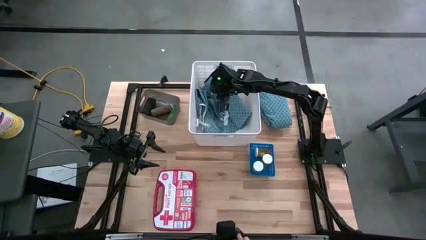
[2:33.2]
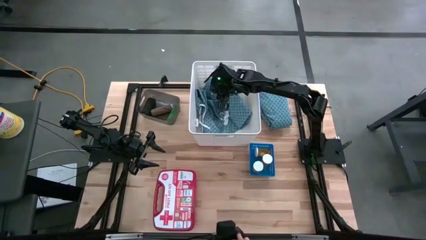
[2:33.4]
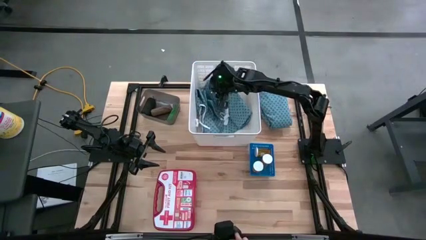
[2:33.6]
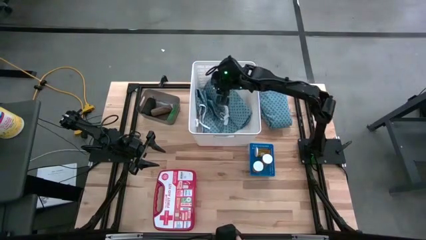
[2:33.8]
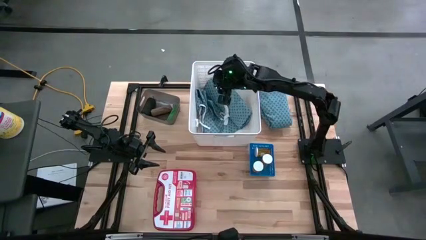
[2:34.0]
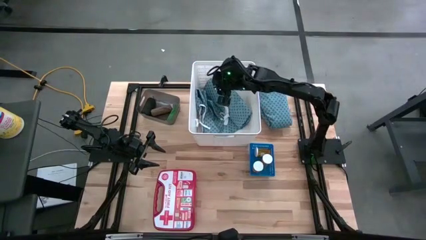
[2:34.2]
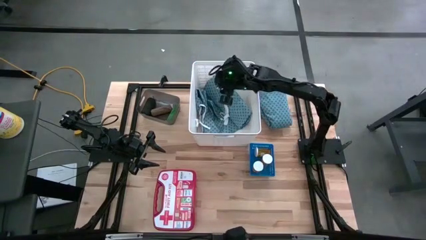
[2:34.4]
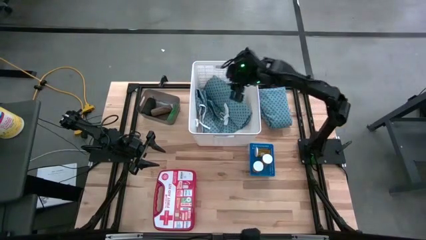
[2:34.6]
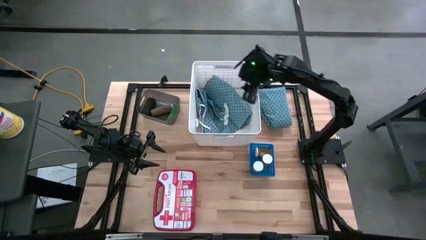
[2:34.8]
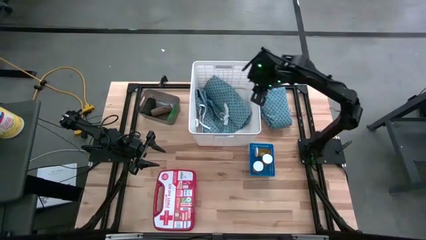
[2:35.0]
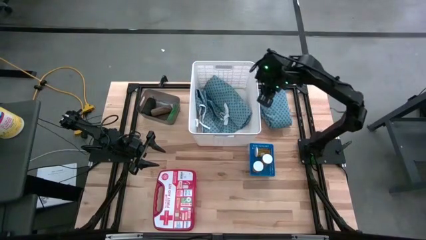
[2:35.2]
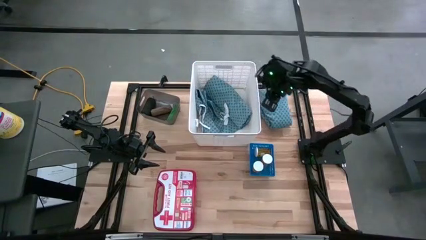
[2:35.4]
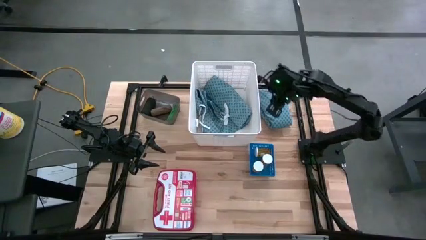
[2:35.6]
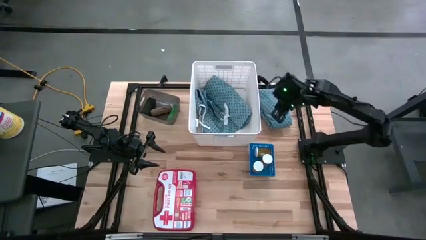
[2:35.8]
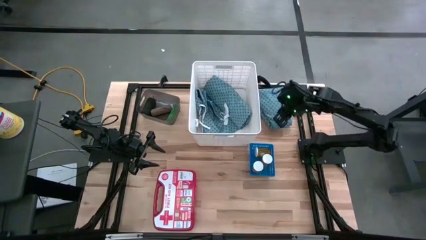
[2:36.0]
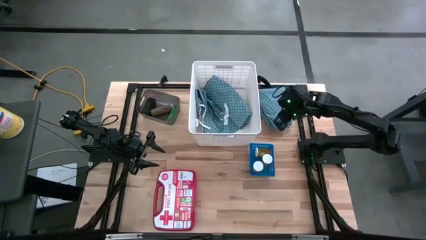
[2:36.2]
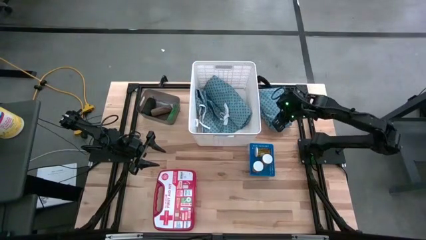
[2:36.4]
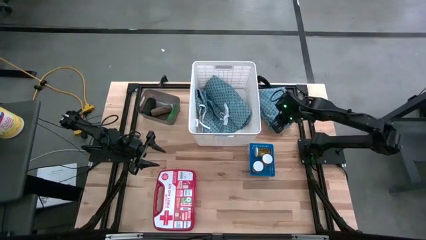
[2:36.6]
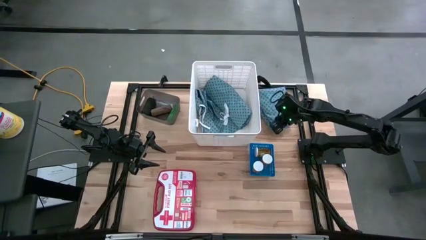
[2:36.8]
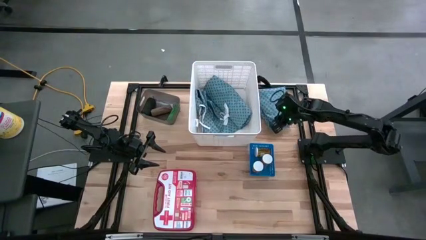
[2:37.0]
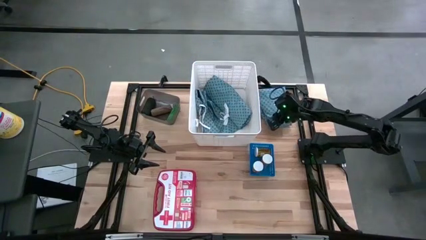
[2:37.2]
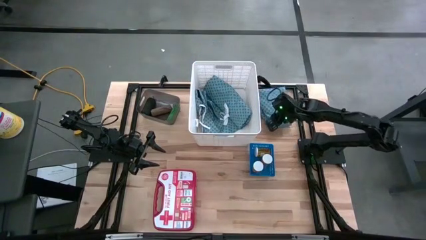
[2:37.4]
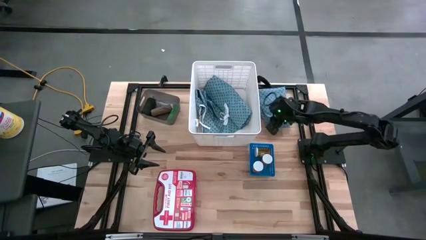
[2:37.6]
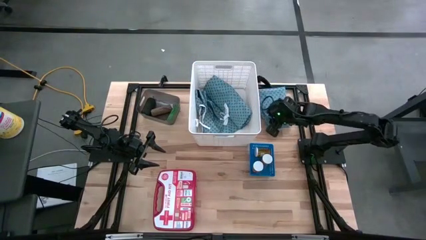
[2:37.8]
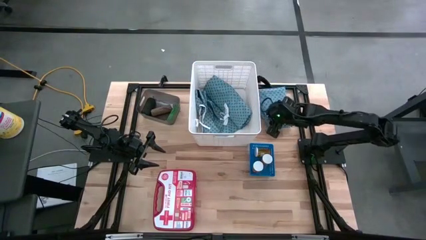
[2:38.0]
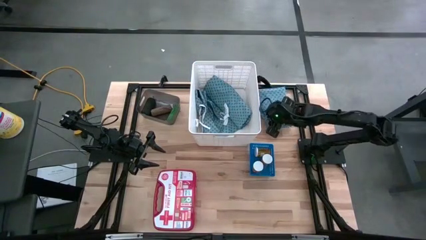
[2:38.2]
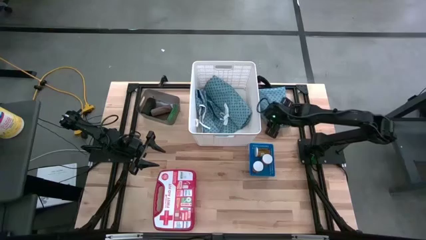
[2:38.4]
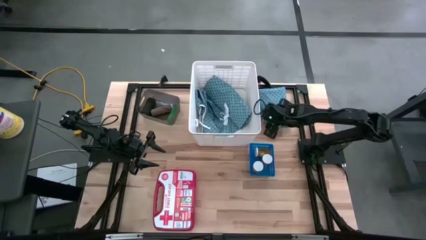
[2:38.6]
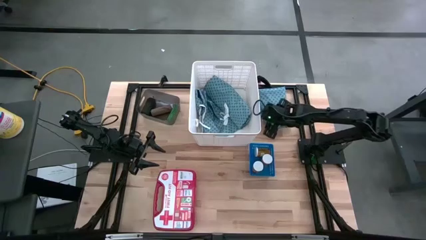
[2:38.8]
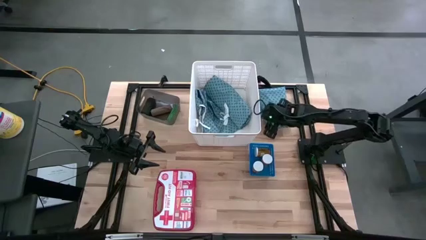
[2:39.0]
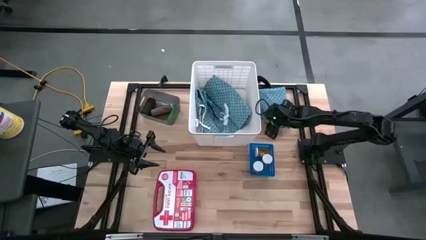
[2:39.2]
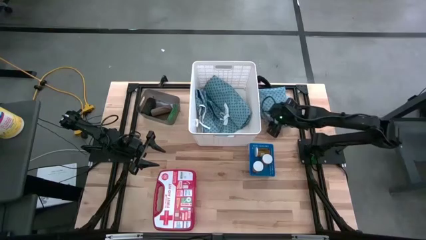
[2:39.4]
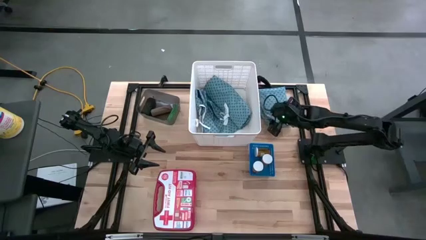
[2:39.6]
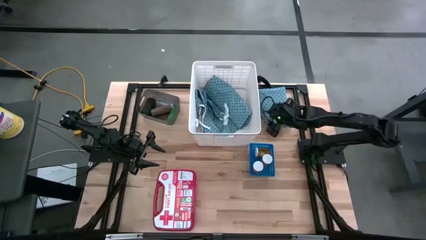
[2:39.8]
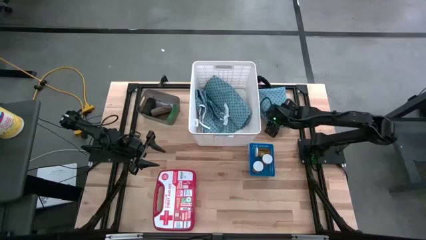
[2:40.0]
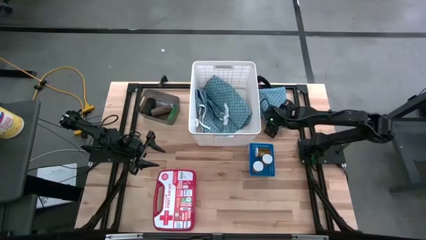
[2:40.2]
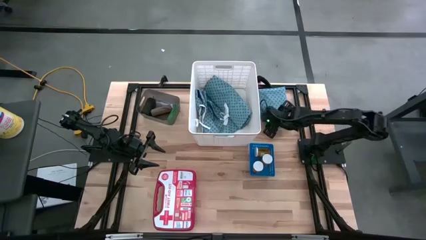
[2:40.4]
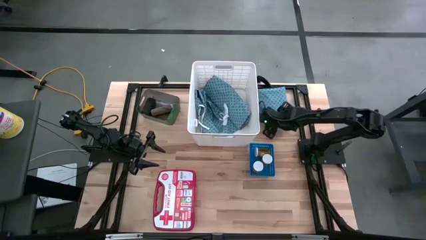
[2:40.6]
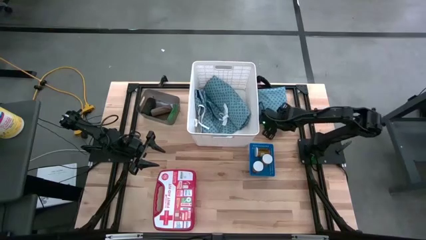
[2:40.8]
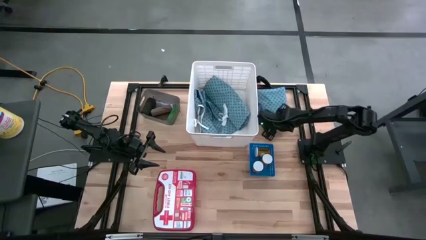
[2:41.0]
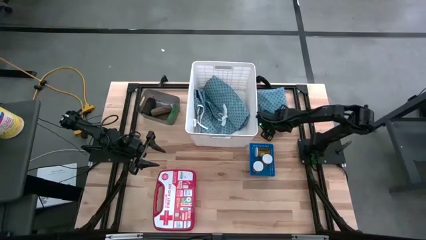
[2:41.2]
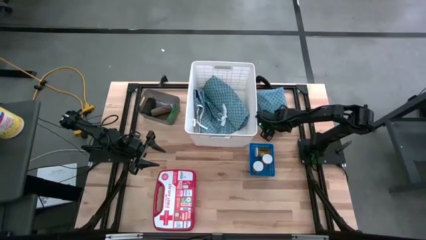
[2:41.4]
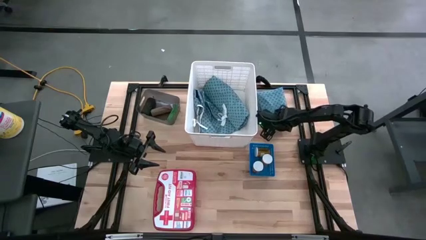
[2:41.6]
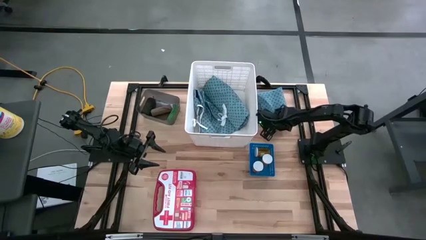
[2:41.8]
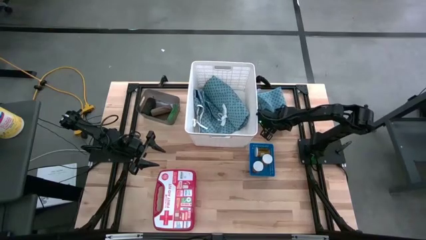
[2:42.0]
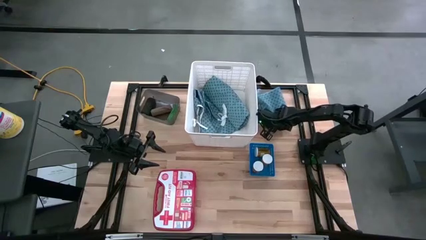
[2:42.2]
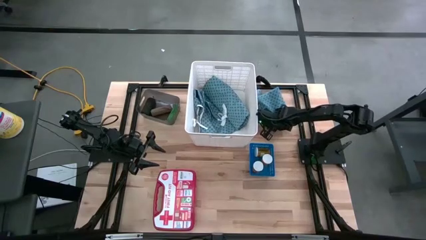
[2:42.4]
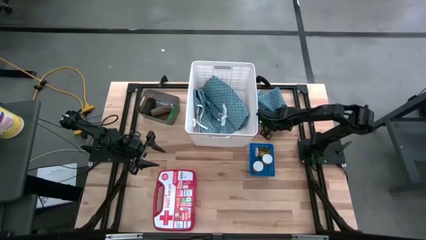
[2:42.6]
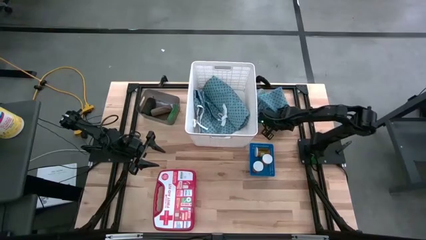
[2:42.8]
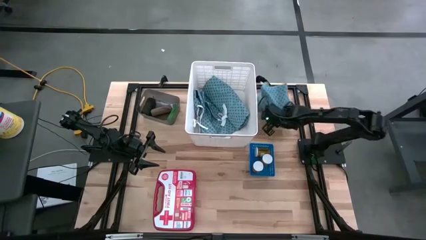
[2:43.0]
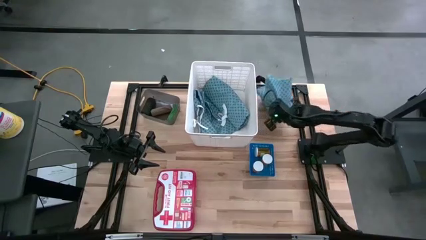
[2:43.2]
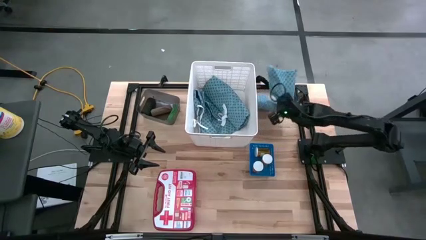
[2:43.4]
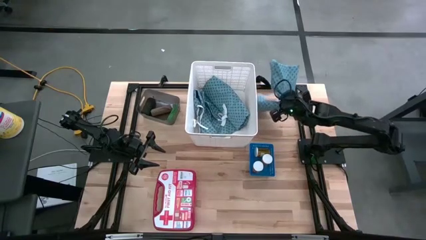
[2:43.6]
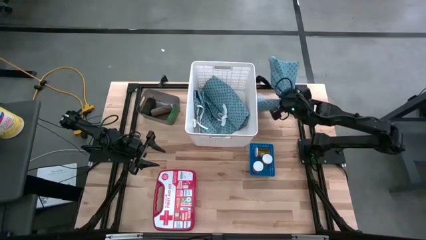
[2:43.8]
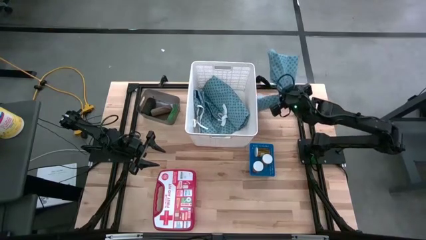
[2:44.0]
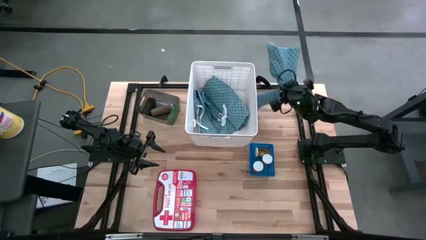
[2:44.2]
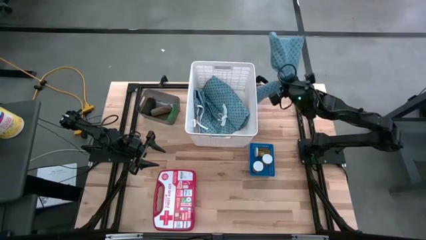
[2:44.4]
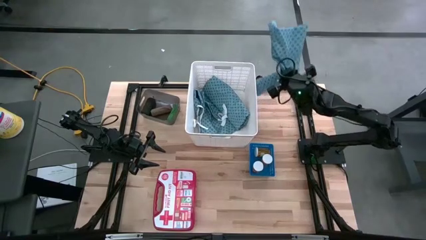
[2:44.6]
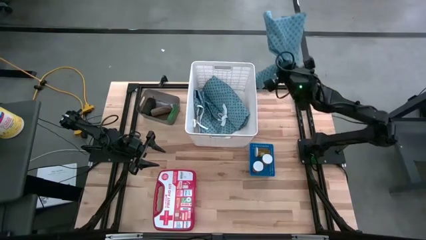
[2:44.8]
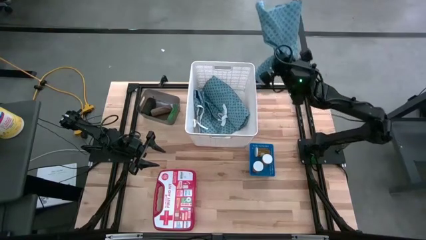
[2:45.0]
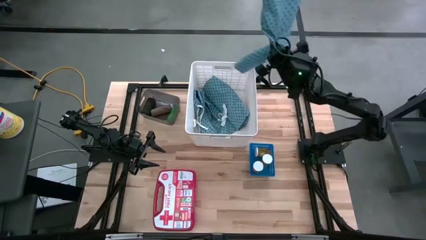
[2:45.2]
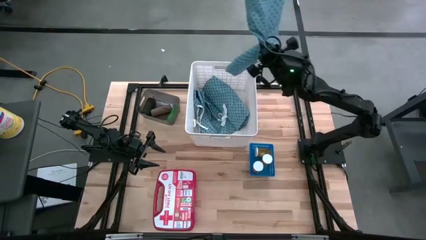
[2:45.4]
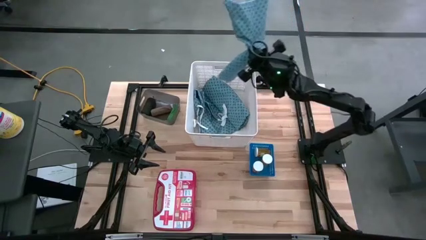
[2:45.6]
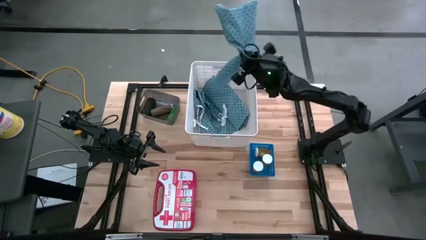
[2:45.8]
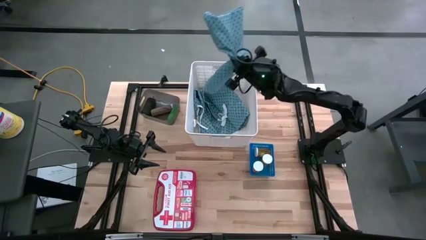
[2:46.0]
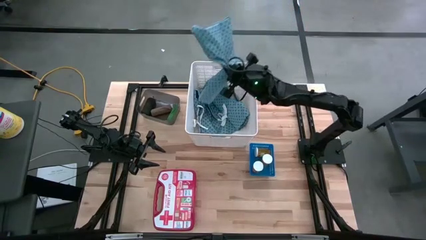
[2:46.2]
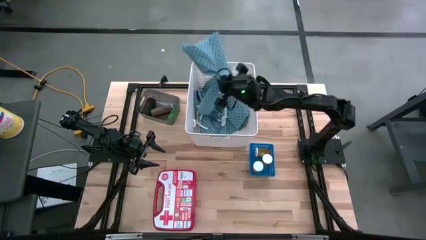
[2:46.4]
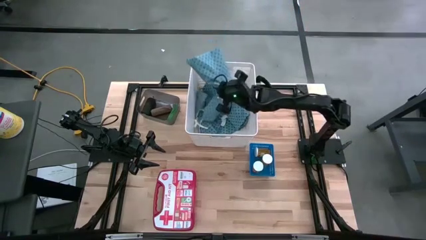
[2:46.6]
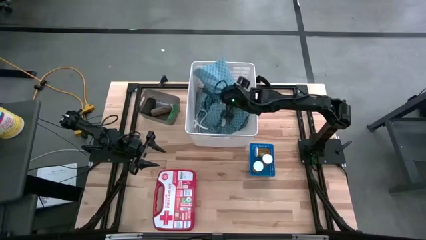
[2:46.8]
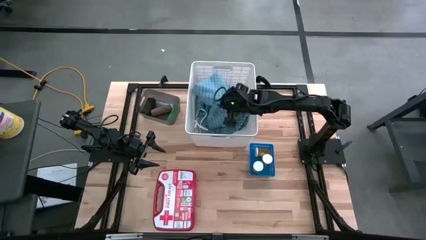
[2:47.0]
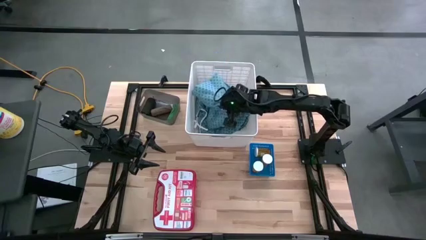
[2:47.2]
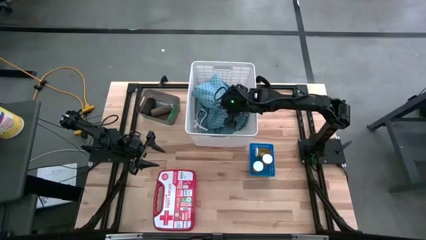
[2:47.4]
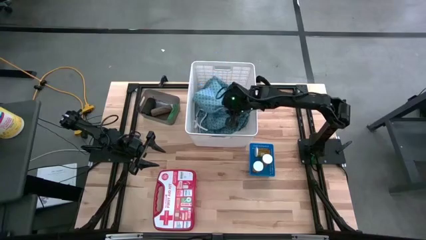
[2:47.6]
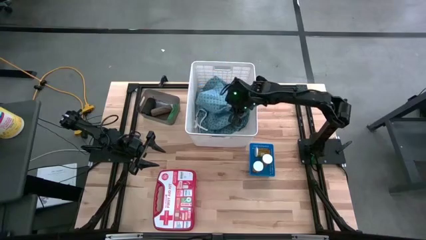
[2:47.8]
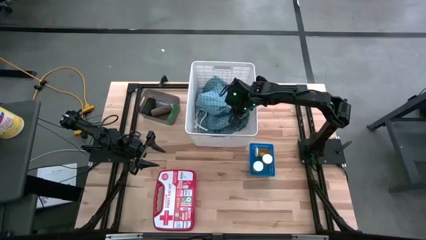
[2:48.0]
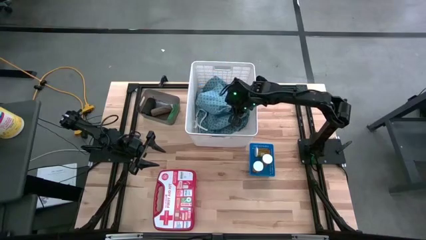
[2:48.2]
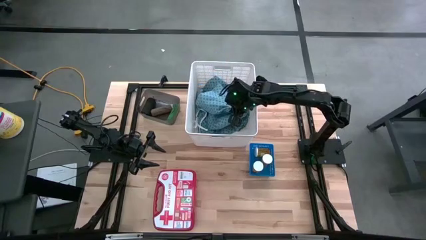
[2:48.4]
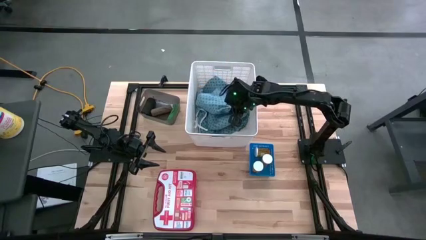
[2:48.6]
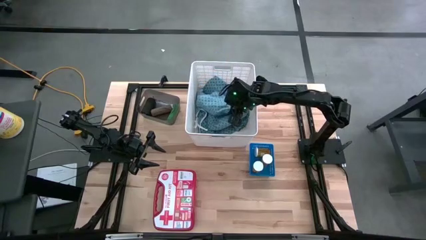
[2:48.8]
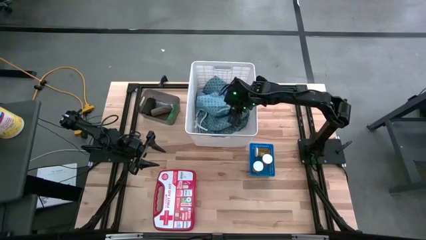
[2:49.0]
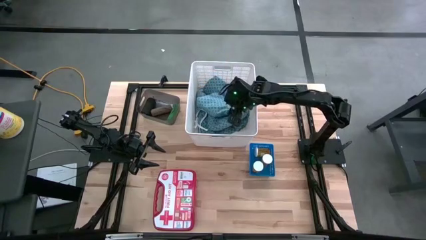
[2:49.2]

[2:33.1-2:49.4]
Task: Pick & place medical supplies in basket/bin
Put the patient gown into the large white bin

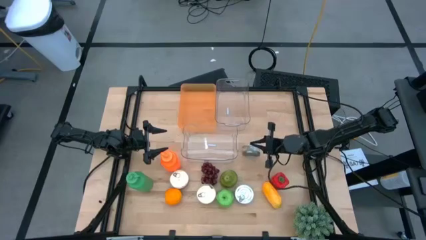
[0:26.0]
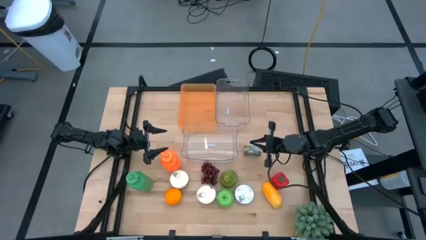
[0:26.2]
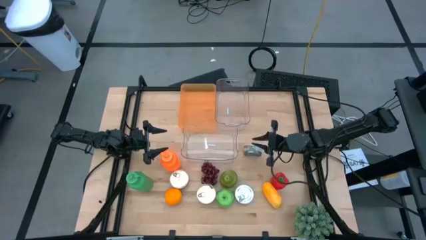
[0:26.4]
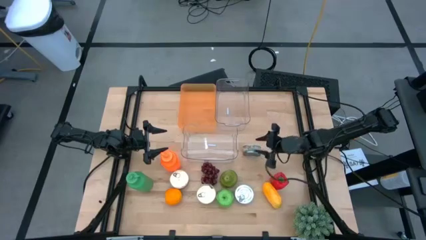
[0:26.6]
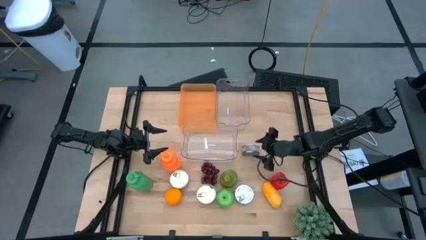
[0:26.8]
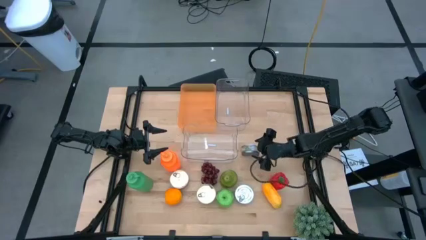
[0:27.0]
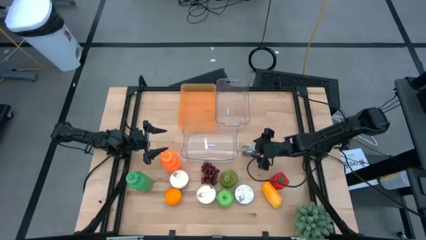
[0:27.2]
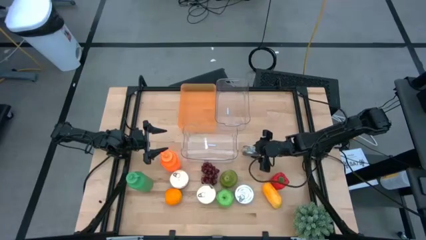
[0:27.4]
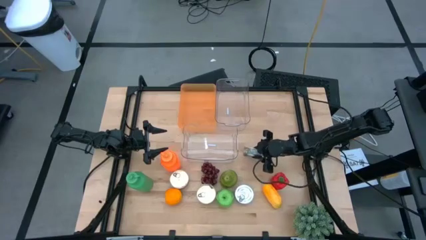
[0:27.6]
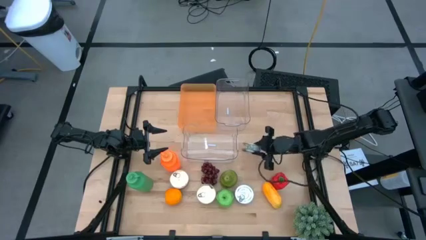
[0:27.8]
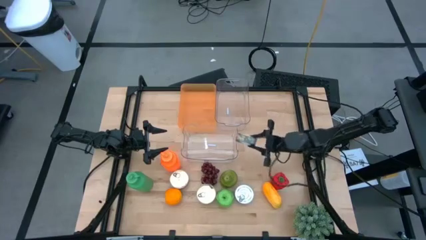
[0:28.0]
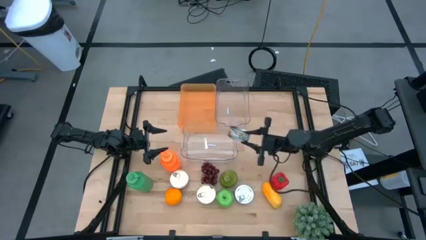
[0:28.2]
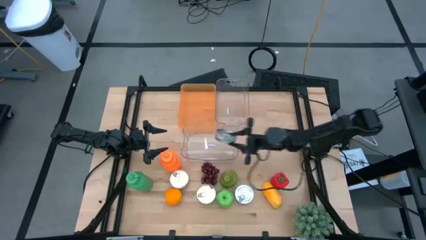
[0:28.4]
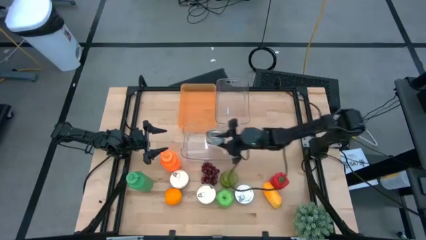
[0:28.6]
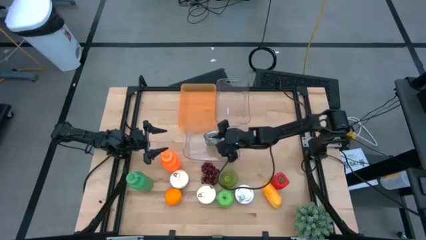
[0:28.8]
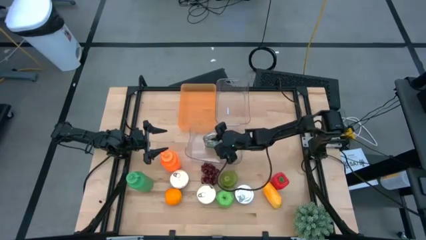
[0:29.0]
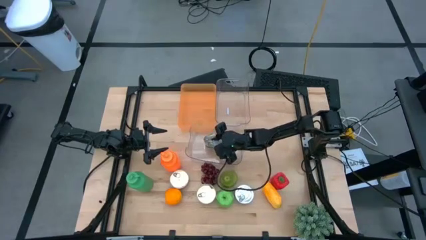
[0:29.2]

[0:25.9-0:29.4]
Task: Pick & Place Food Item
Put the top green tuna can into the bottom transparent bin
